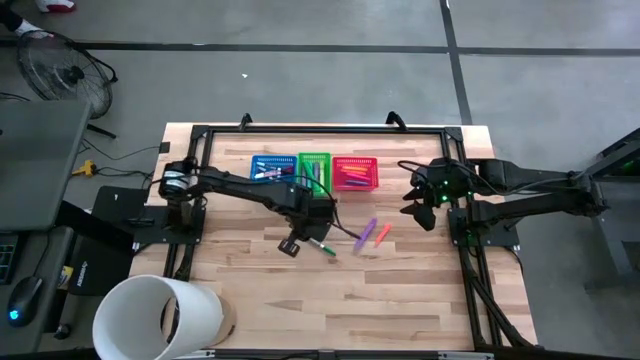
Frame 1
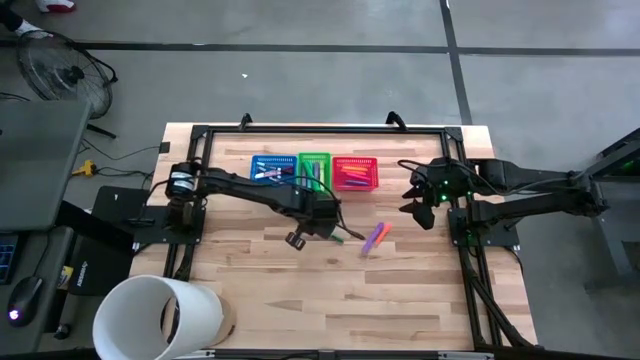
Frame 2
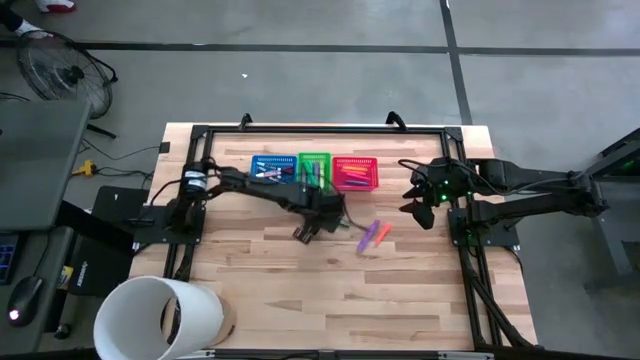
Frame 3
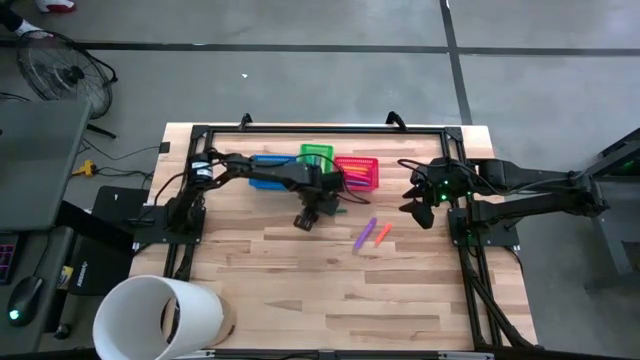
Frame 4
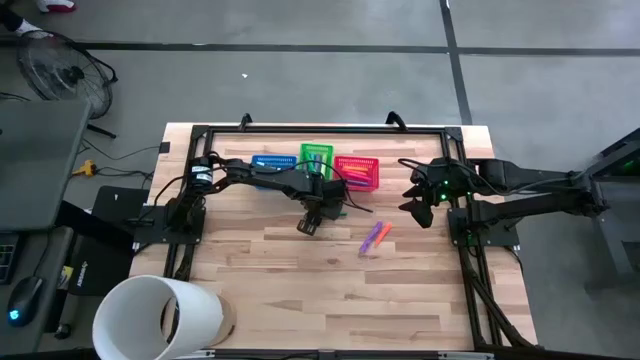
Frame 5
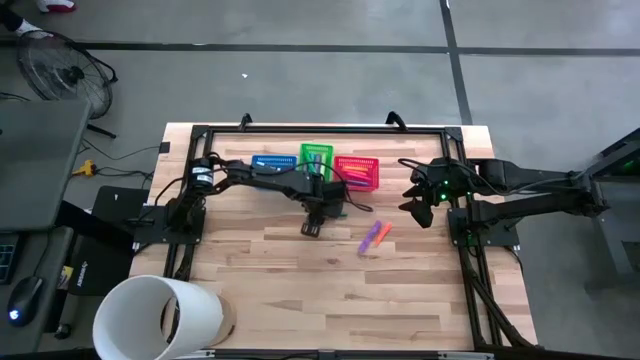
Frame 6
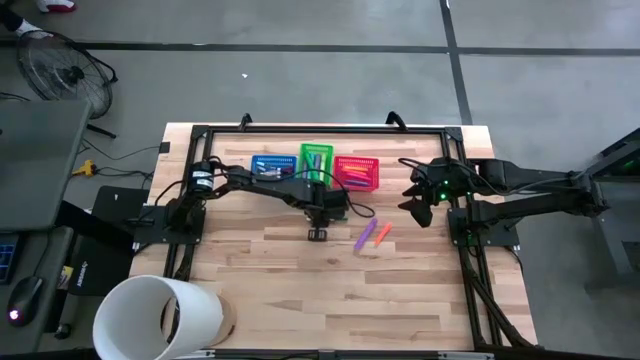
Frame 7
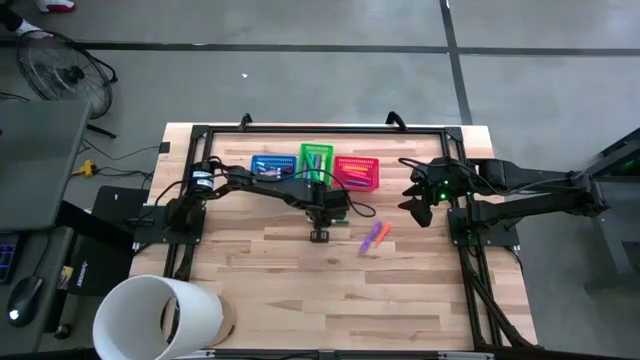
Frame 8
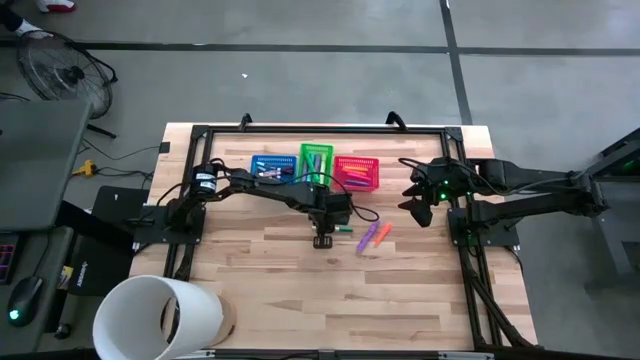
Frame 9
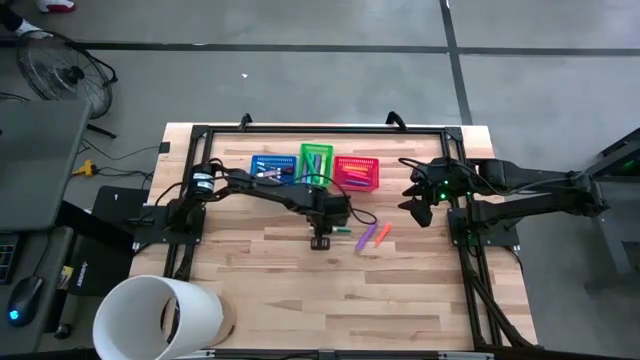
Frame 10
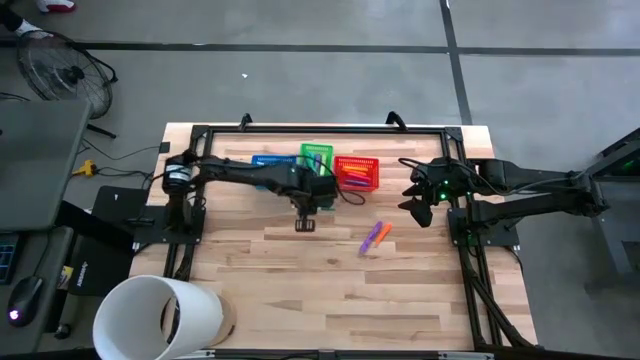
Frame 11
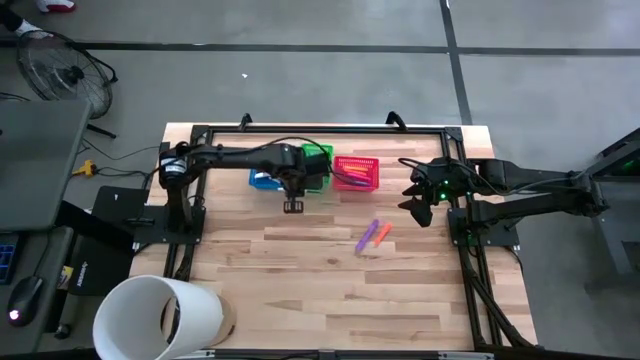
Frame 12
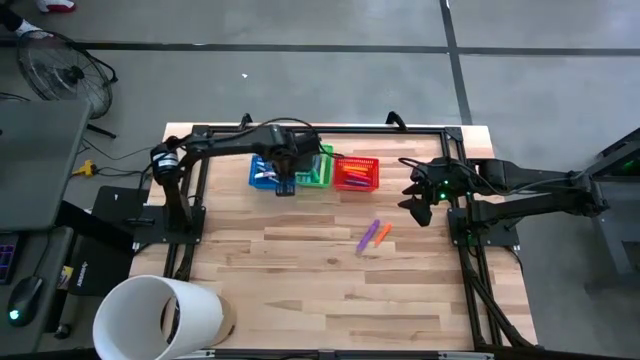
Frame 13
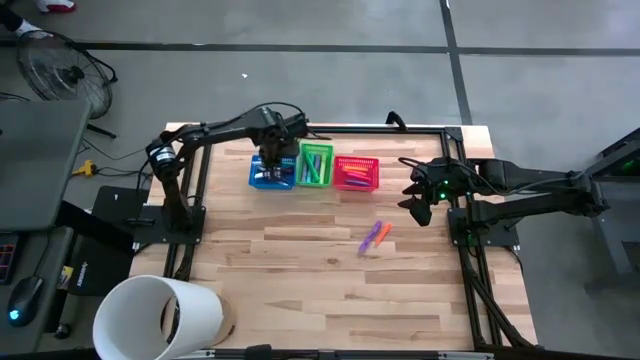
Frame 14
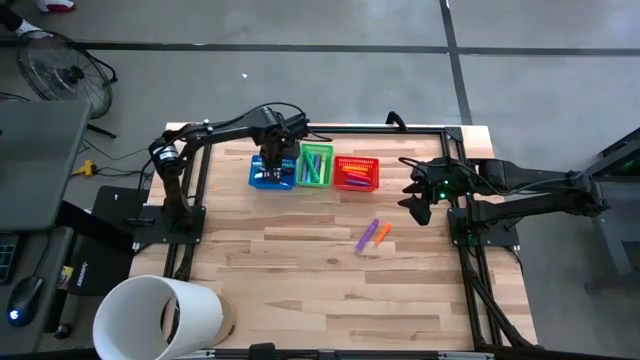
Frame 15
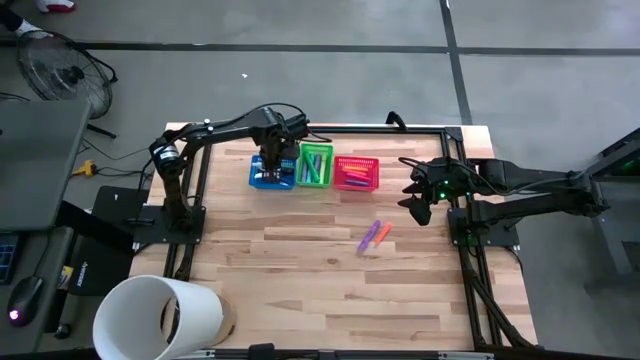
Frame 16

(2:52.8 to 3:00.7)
Task: Pick & Place Markers
Put the green marker into the blue bin

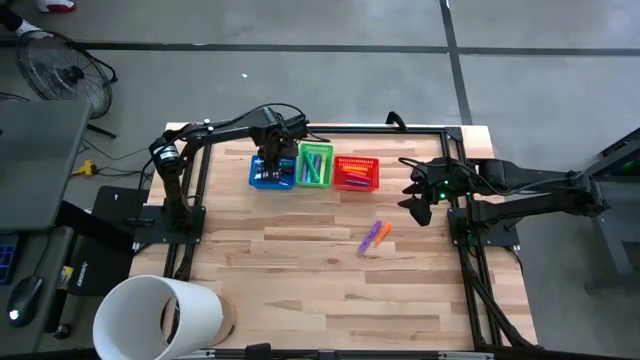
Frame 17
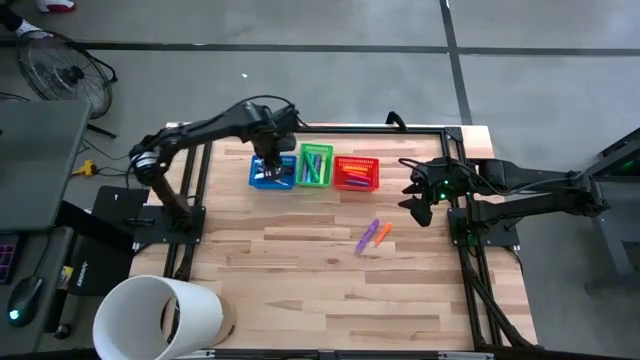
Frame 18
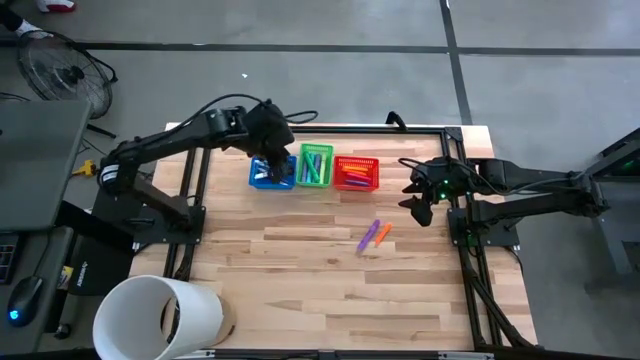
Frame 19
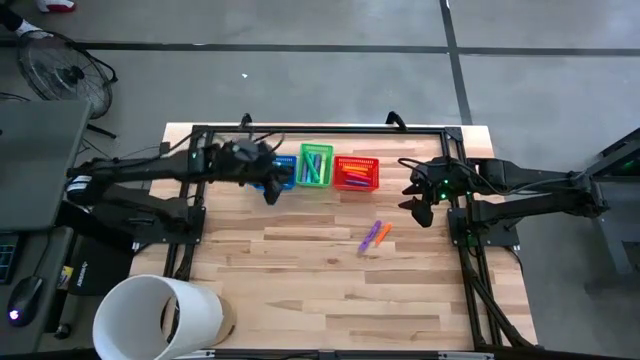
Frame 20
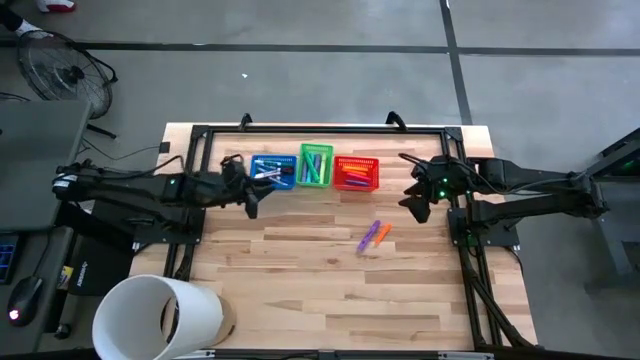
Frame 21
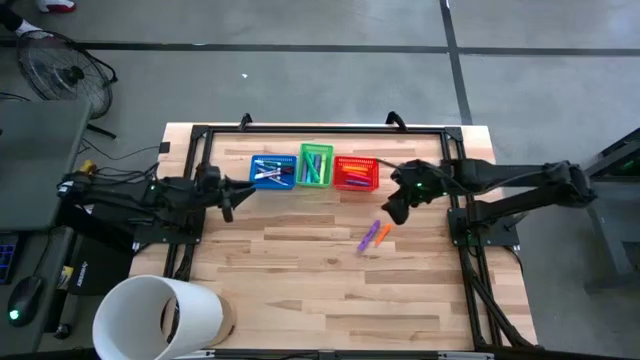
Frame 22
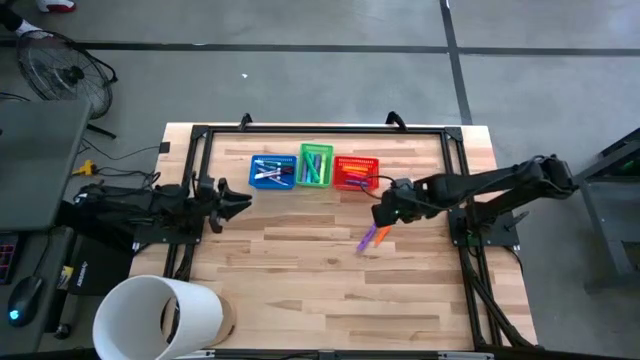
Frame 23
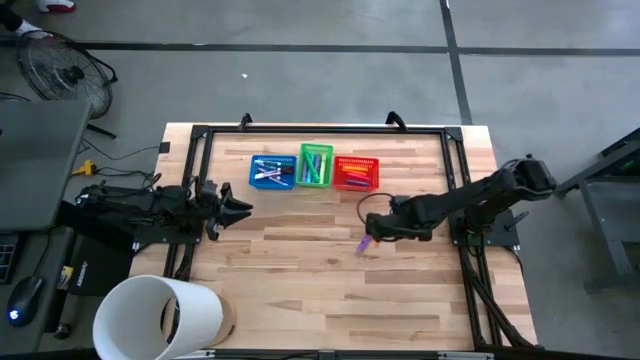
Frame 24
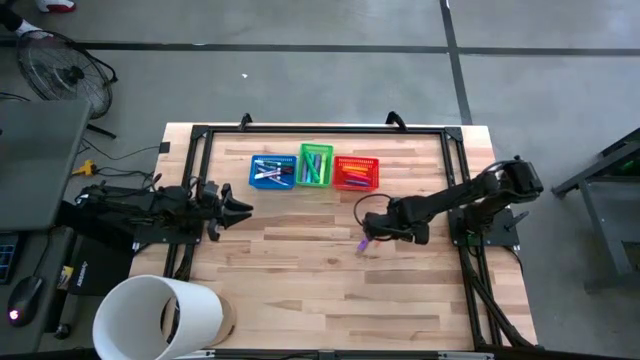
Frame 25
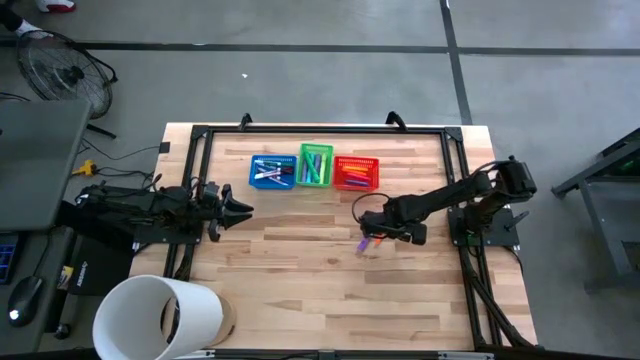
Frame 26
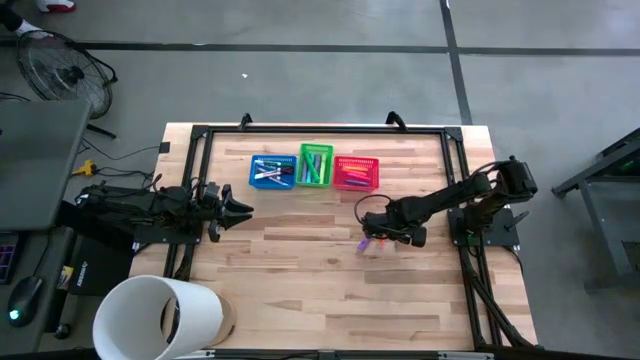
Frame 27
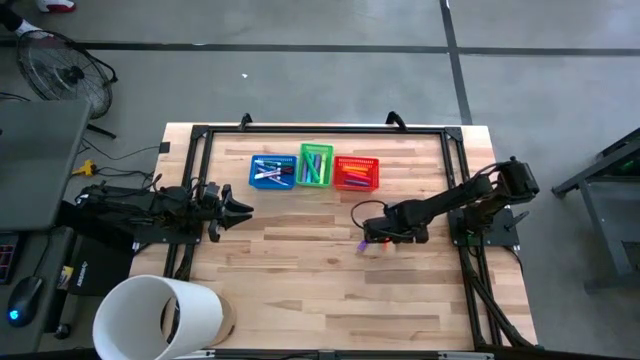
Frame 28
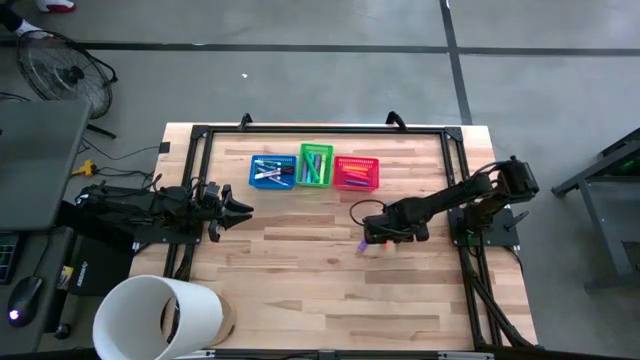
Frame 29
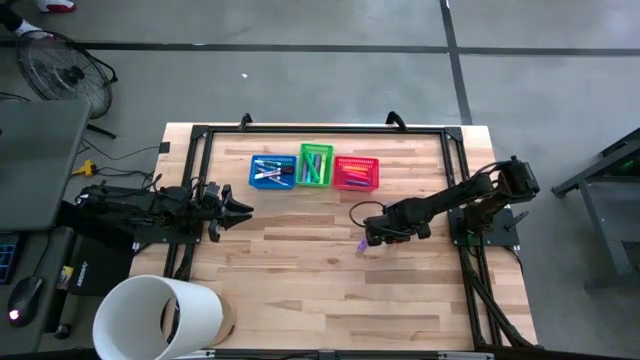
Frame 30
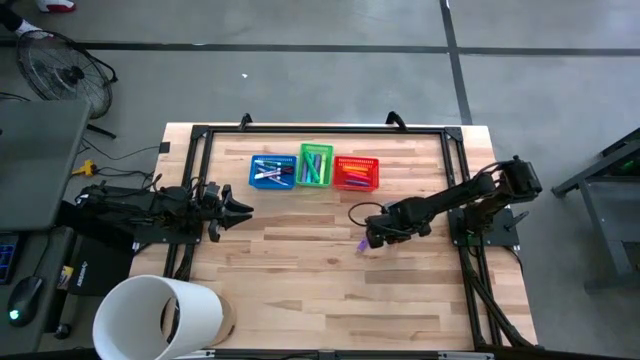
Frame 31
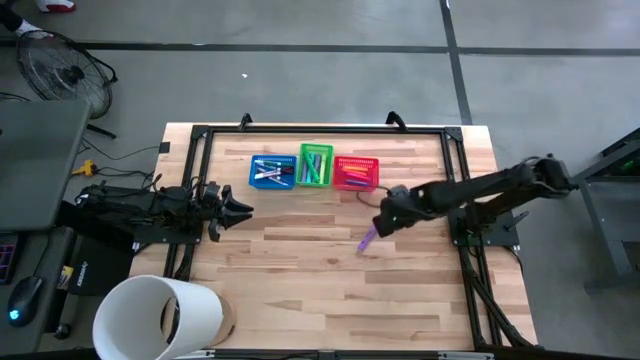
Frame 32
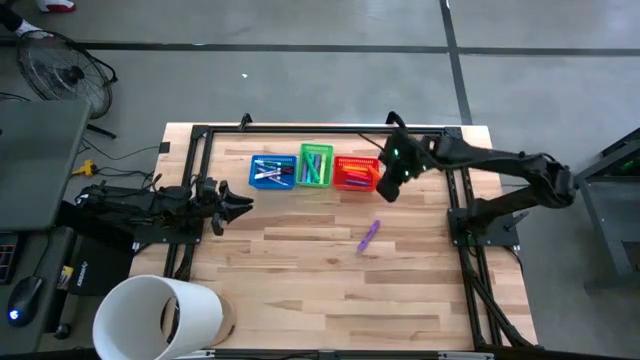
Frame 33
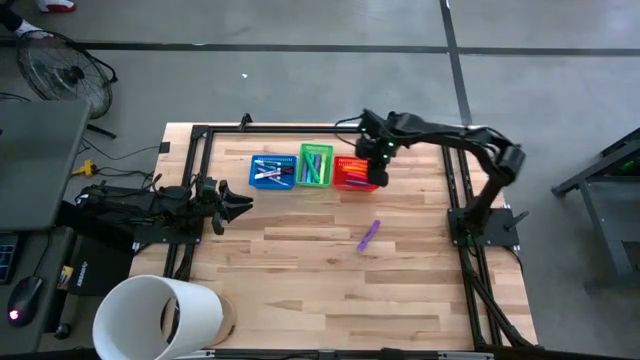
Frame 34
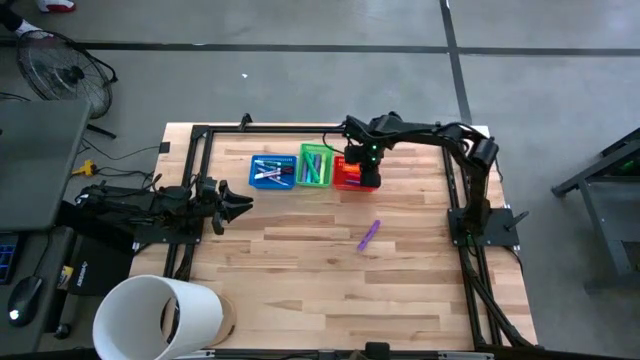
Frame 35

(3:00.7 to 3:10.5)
Put the orange pen into the red bin
